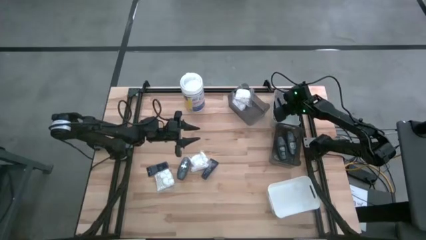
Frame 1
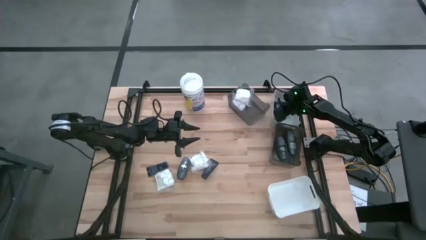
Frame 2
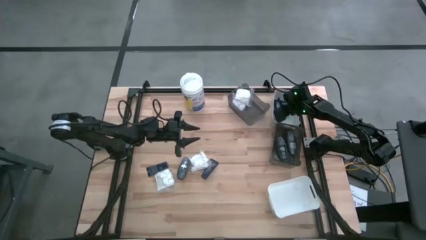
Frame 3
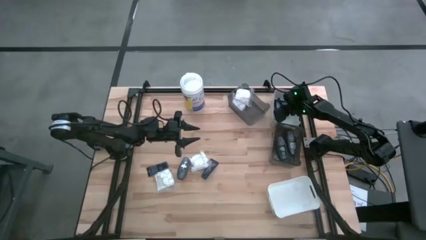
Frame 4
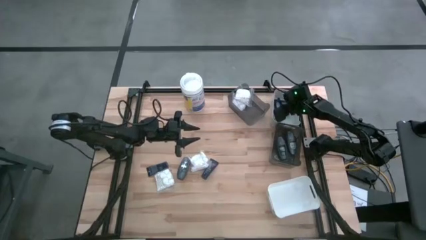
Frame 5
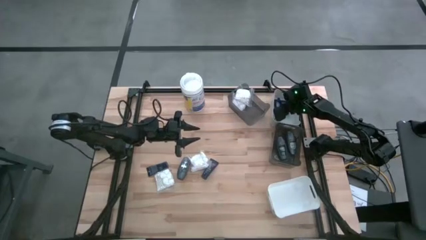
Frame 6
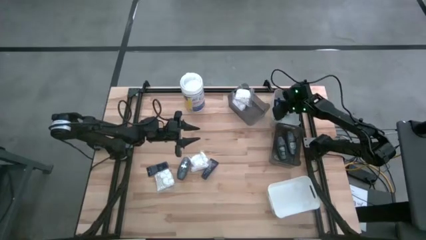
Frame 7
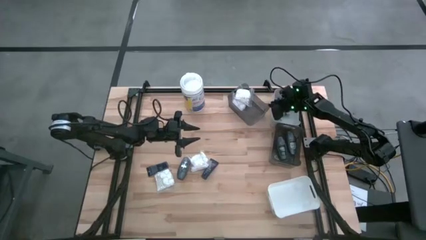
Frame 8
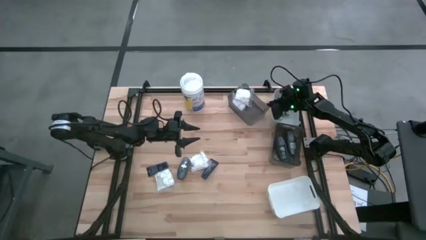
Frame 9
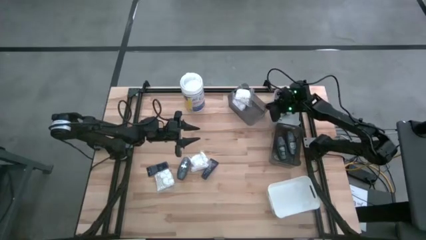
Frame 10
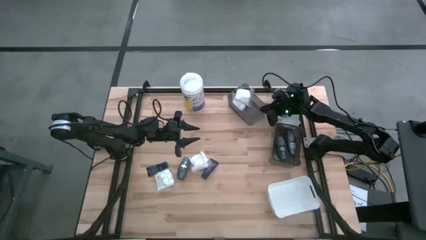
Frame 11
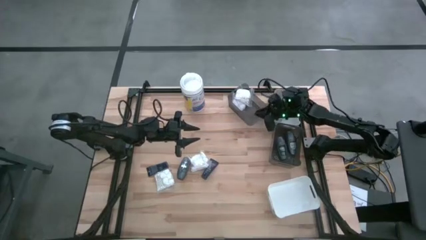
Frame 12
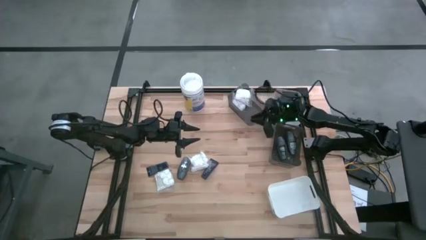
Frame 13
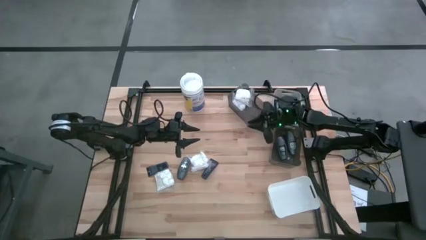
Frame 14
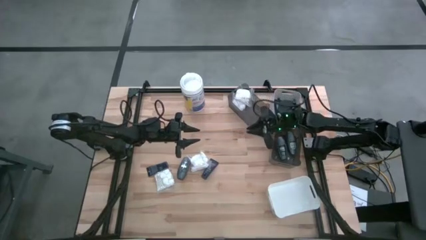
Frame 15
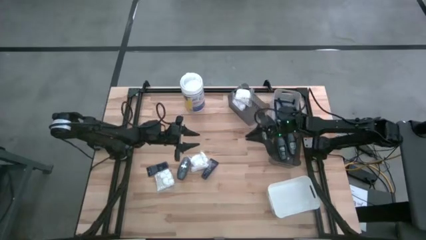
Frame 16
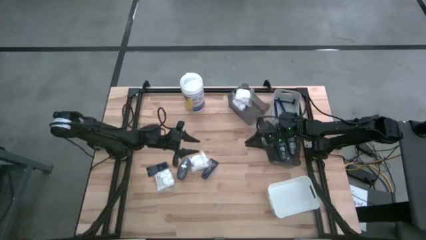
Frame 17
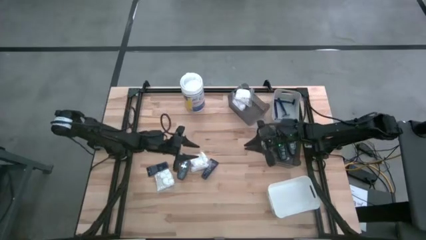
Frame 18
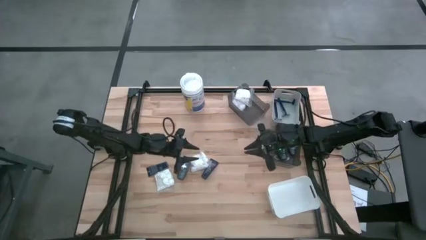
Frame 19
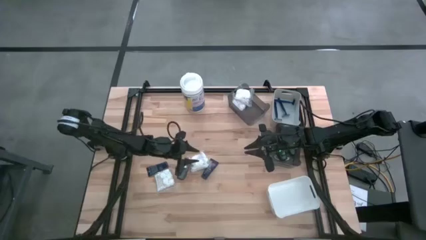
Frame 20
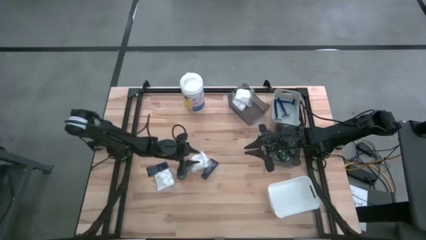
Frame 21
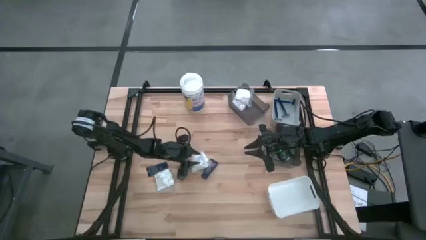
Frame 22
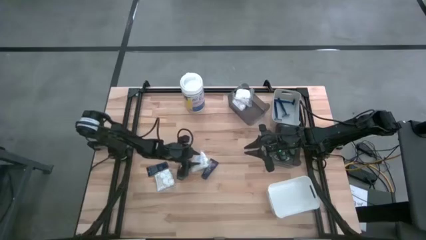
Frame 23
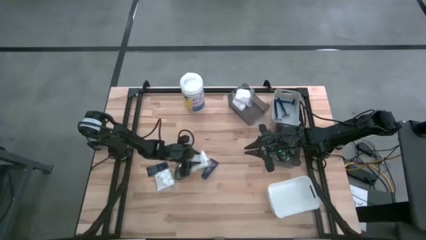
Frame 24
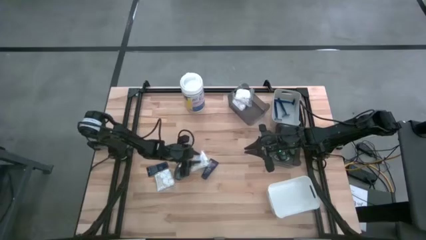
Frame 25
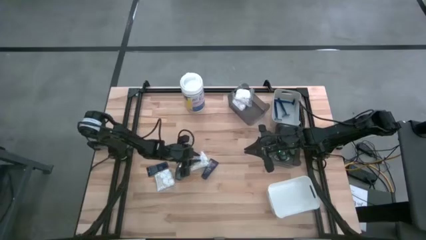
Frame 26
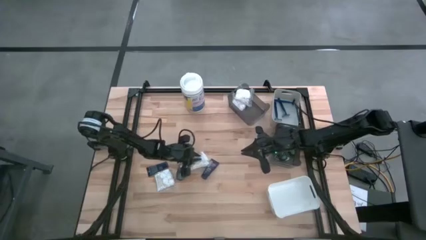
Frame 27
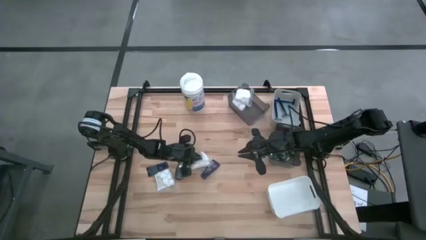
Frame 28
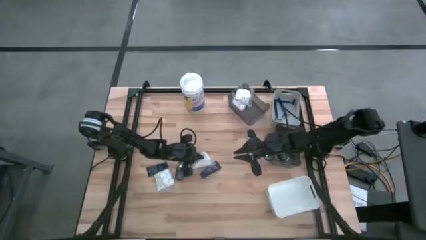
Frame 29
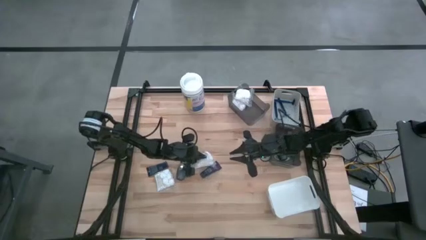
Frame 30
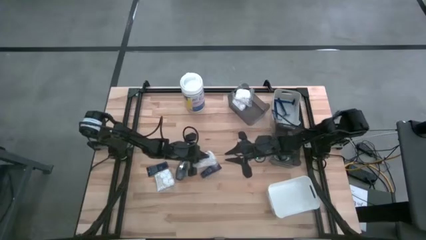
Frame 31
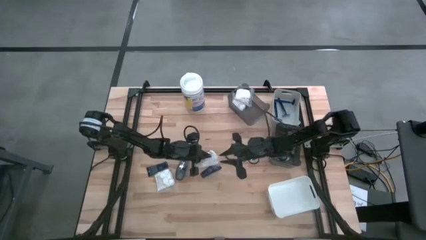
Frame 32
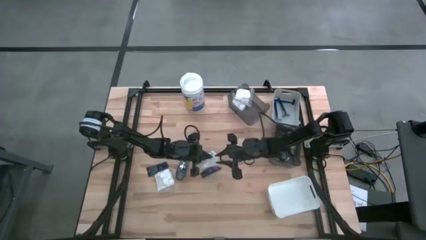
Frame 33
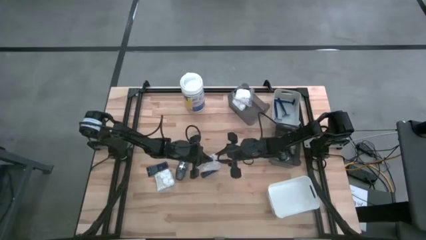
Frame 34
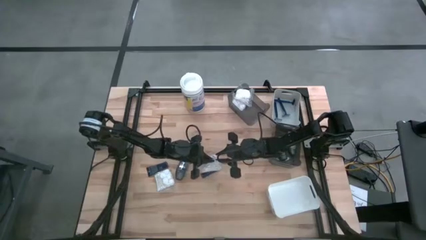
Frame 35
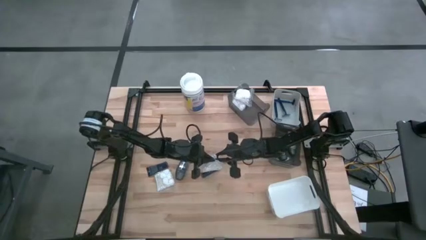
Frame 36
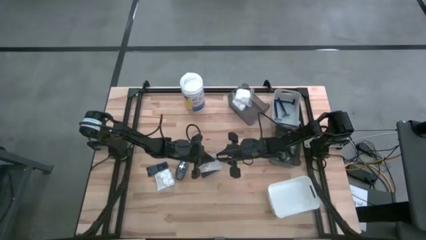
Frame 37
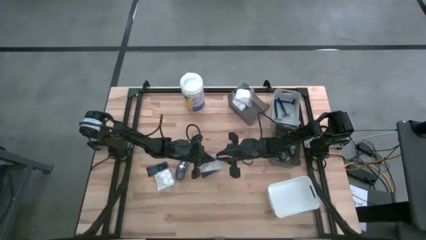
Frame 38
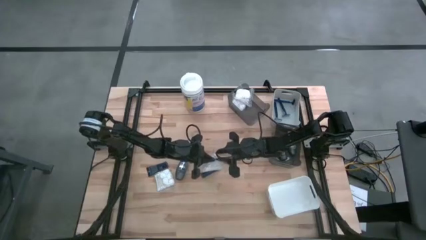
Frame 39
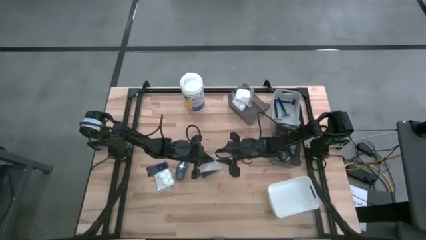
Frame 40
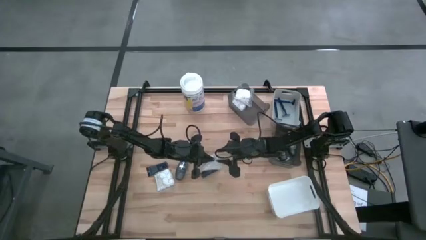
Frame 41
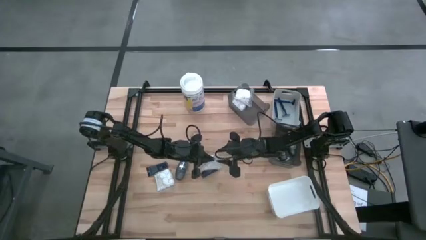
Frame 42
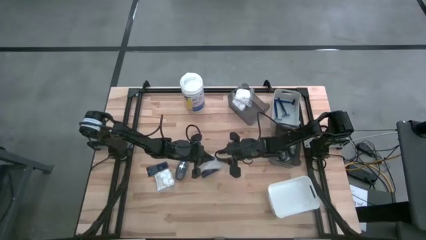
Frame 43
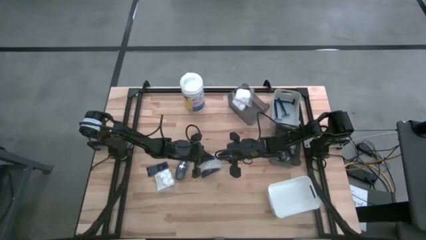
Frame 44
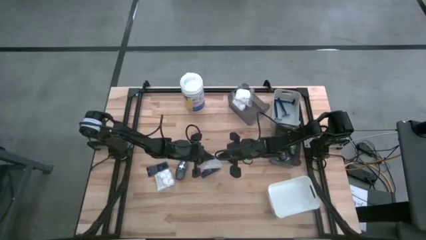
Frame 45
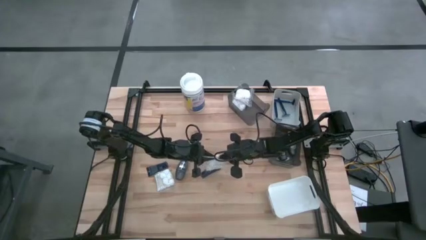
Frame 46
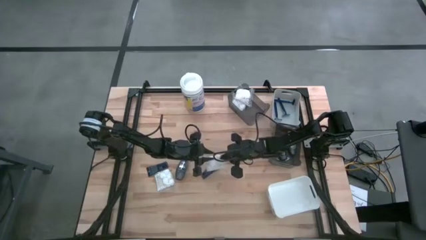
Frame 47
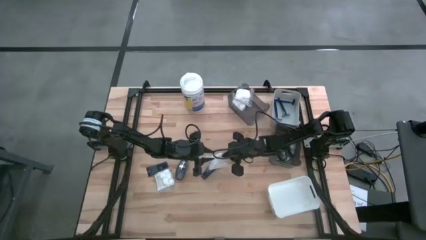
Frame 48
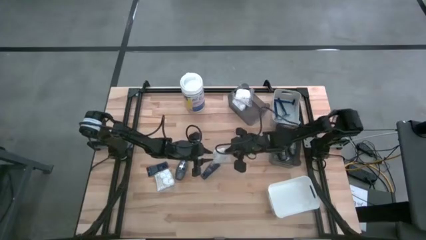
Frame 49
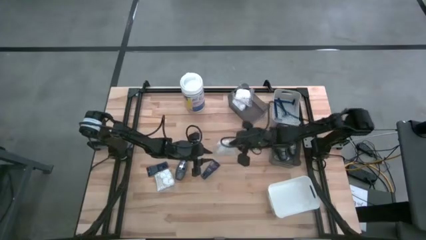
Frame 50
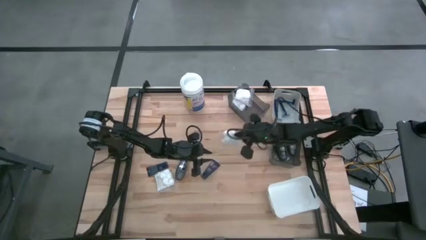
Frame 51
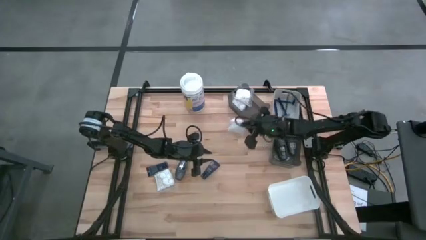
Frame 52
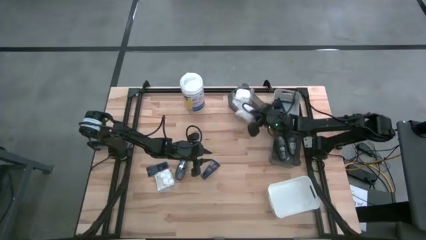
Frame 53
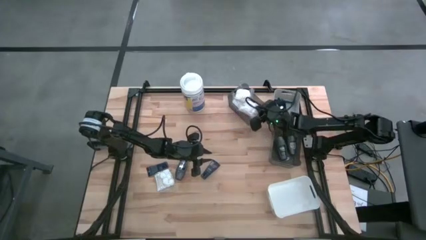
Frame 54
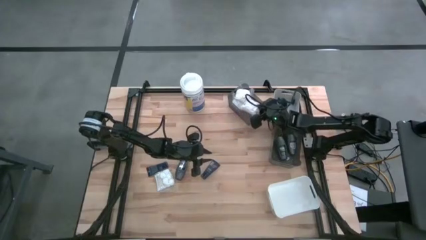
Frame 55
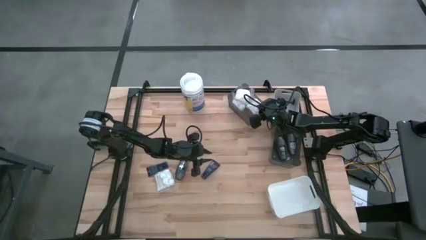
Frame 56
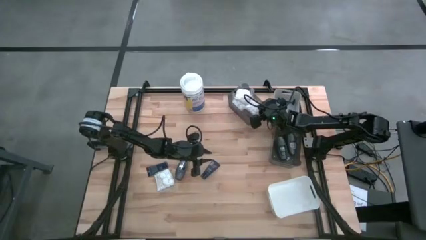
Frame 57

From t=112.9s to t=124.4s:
Task: Pick & Place Travel size toiletries
Put the right white cotton pack into the top black bin

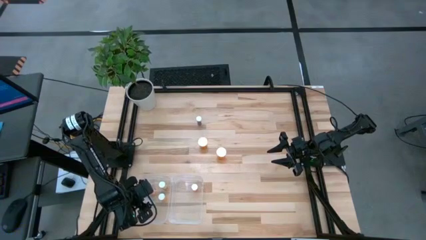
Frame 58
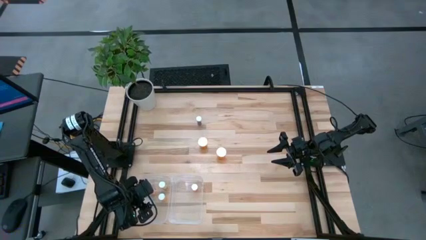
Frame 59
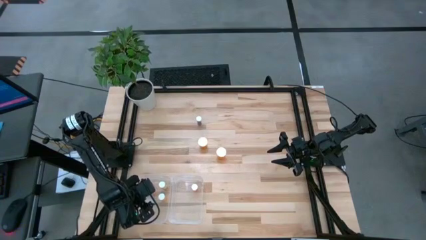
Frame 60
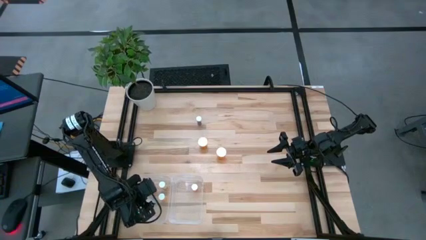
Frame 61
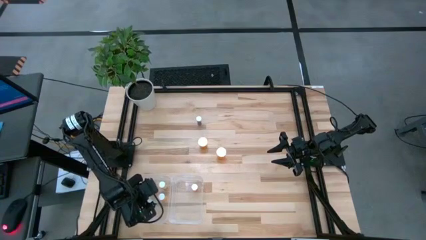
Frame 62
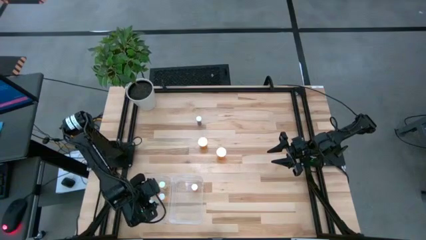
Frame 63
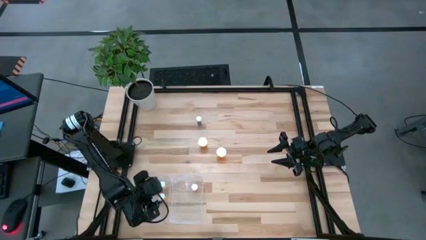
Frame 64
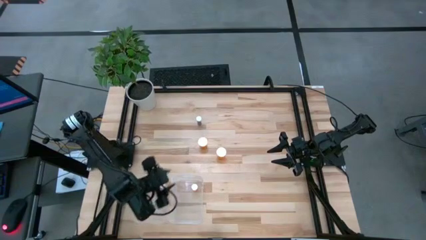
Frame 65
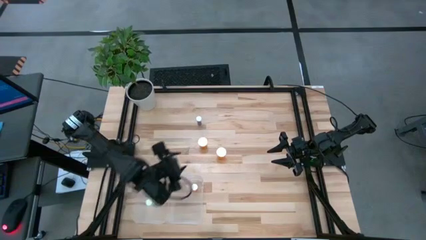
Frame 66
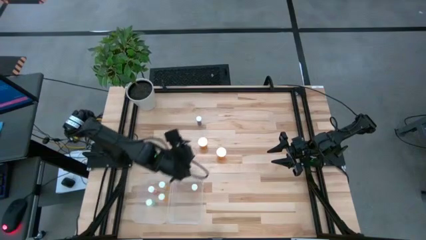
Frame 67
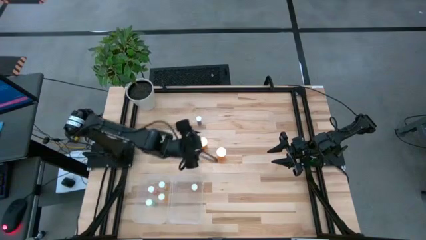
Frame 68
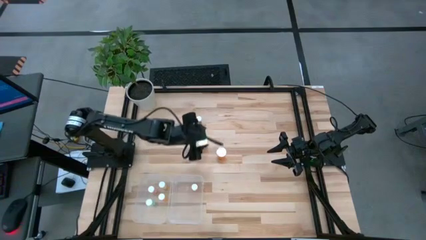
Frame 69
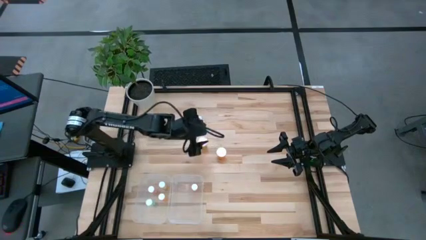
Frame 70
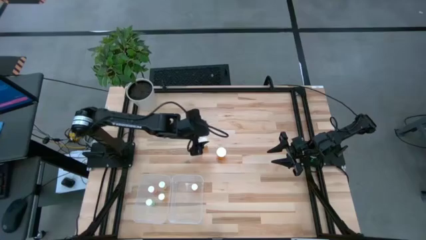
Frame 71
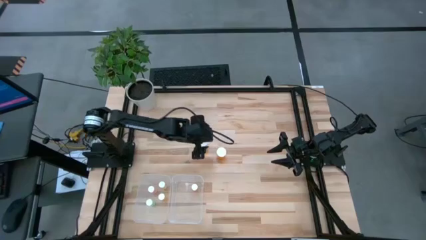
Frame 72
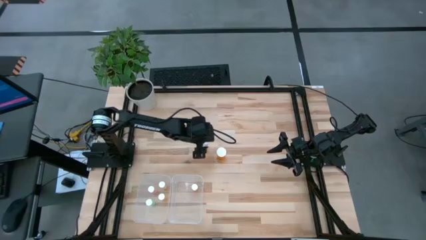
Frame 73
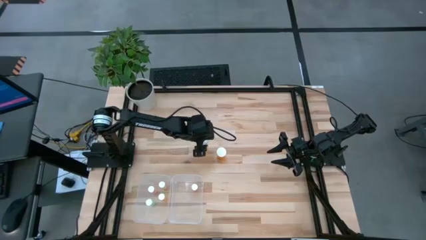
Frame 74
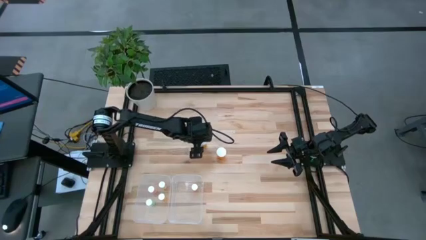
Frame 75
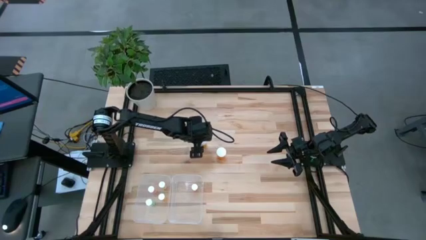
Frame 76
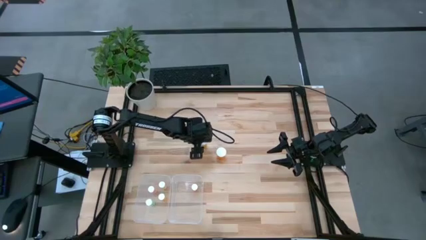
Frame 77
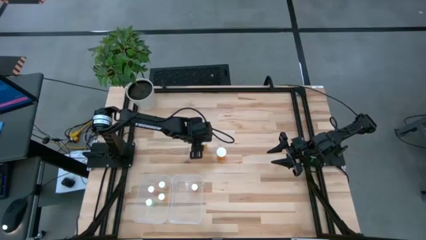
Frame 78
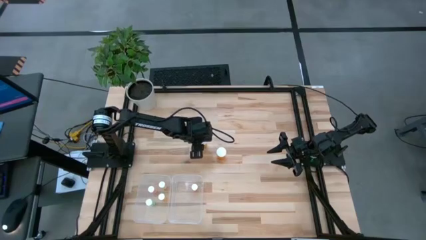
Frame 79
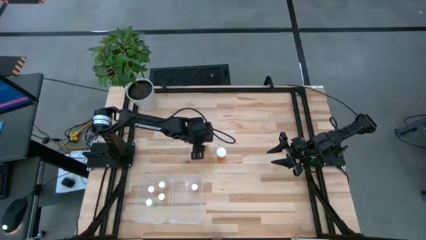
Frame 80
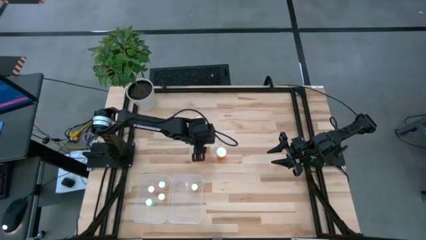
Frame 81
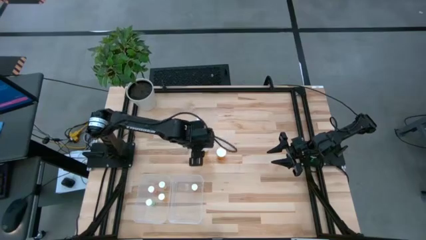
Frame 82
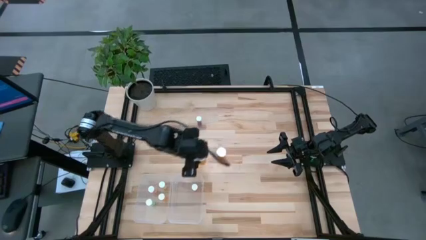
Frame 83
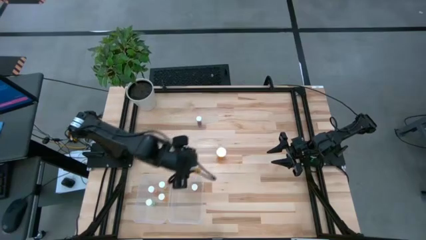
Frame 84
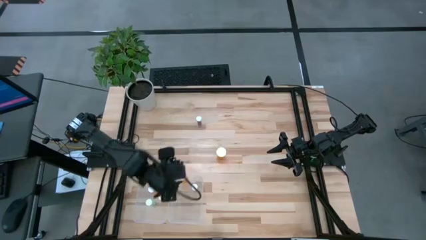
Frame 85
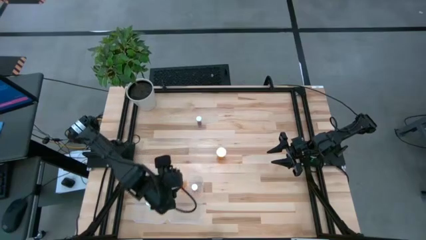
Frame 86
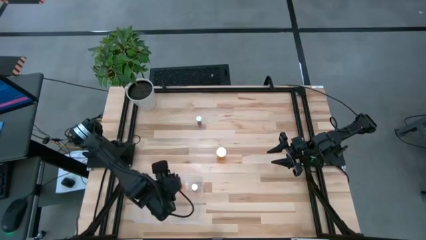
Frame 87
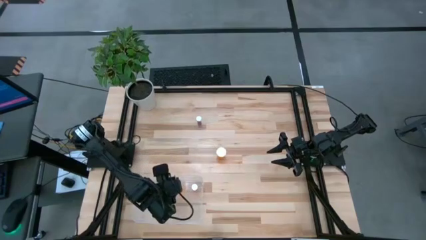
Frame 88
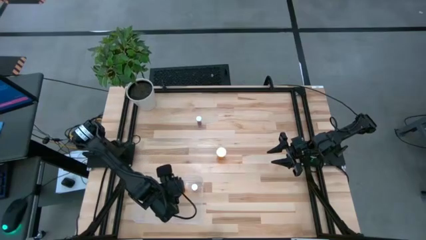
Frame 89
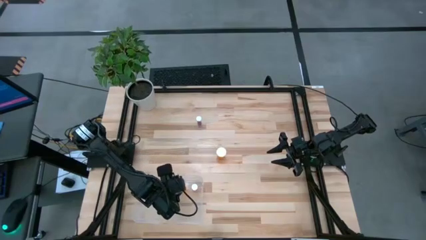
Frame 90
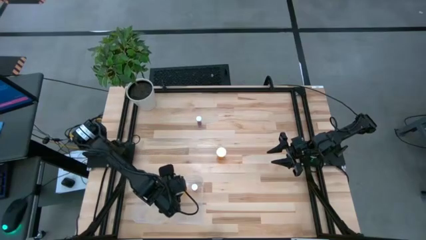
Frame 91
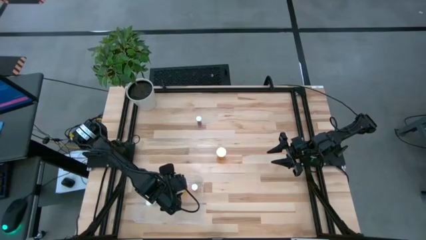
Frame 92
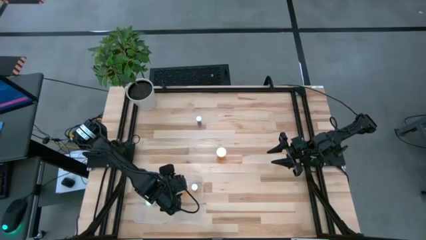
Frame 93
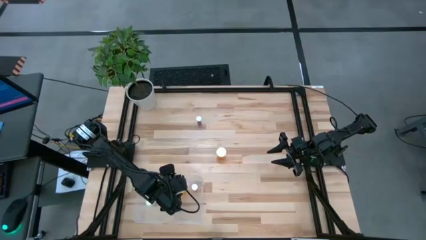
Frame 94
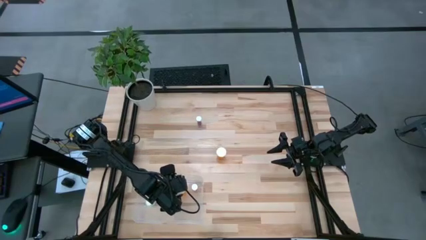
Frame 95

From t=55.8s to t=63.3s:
Task: Pick and place medicine bottles into bin by pill shape (circle, oval)
Put the left large orange capsule bottle into the right transparent bin
